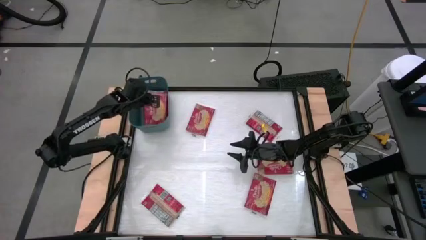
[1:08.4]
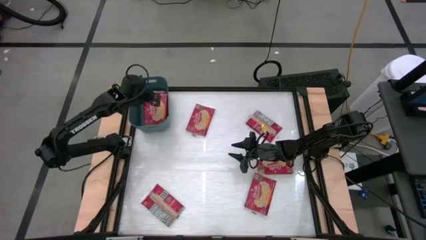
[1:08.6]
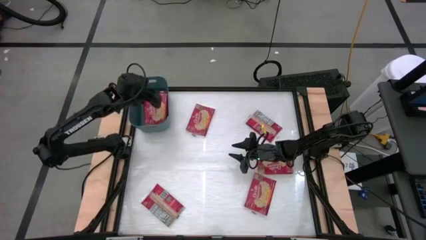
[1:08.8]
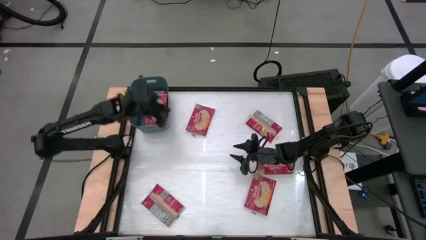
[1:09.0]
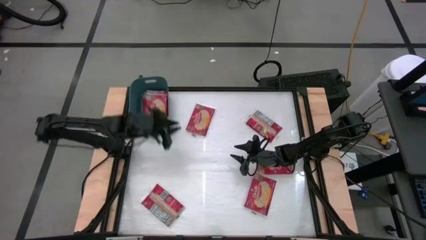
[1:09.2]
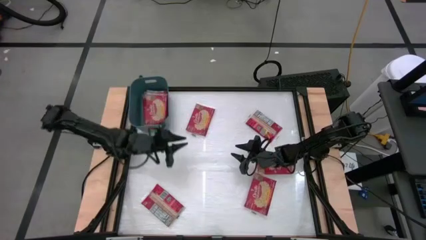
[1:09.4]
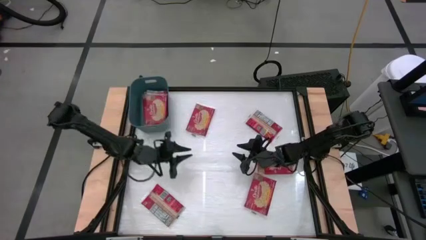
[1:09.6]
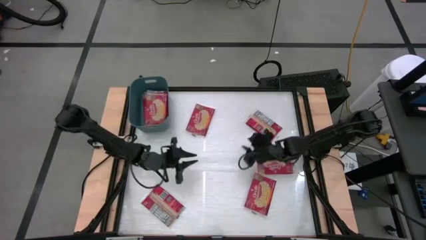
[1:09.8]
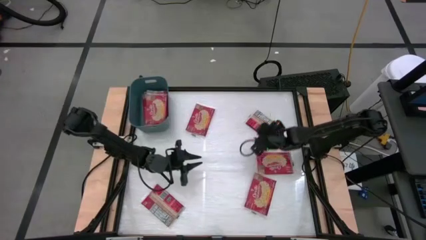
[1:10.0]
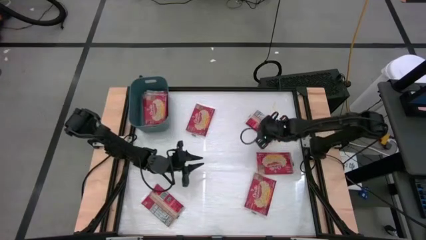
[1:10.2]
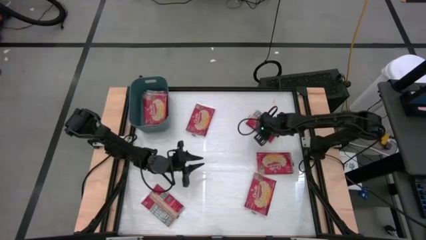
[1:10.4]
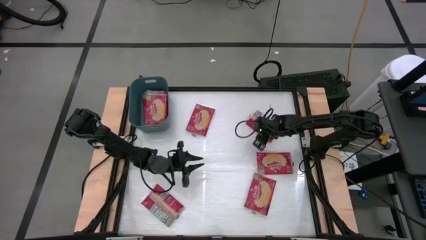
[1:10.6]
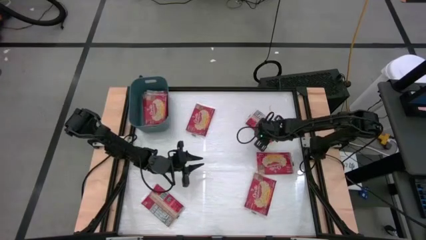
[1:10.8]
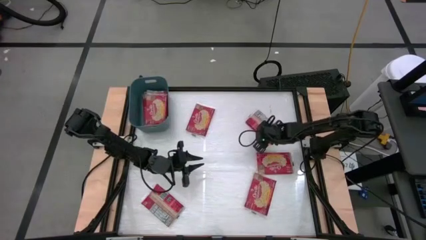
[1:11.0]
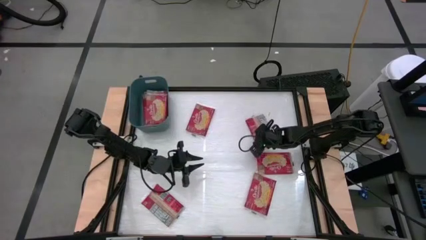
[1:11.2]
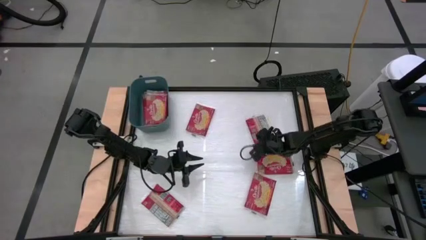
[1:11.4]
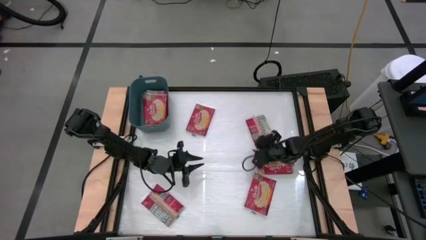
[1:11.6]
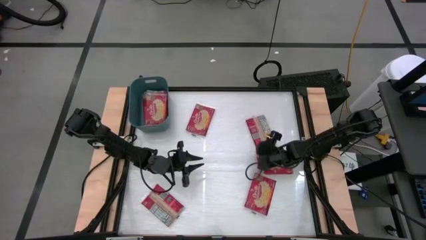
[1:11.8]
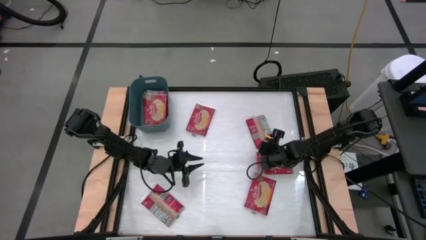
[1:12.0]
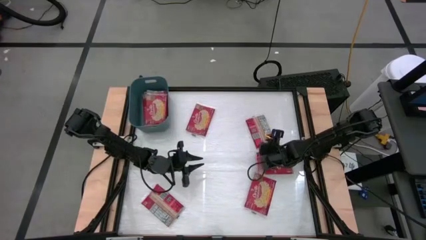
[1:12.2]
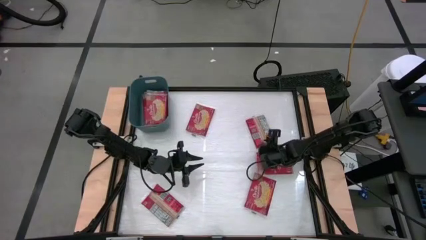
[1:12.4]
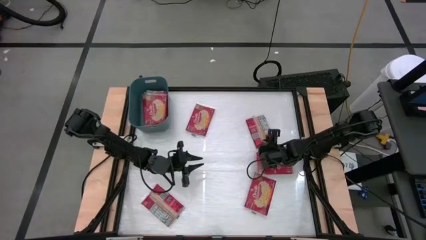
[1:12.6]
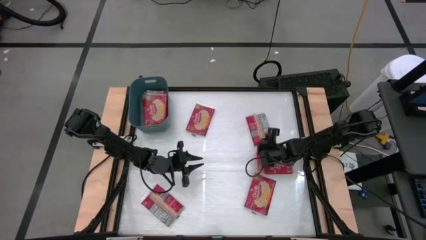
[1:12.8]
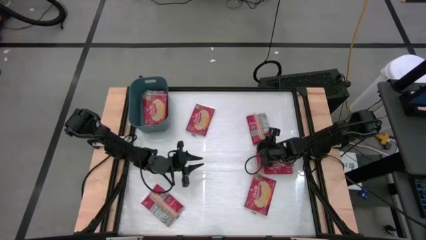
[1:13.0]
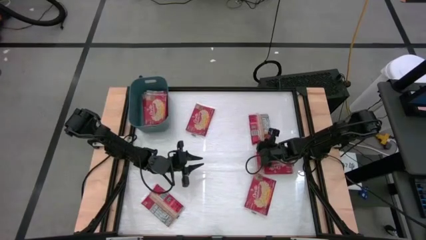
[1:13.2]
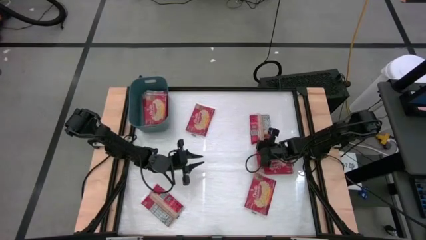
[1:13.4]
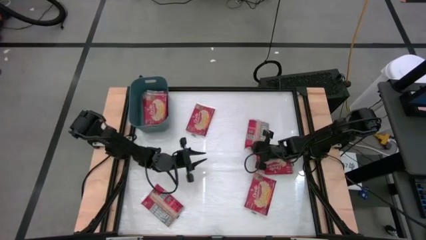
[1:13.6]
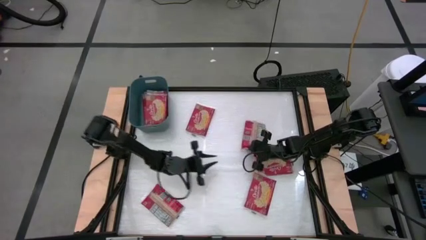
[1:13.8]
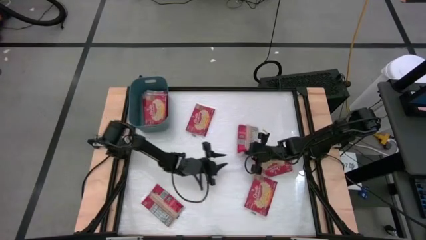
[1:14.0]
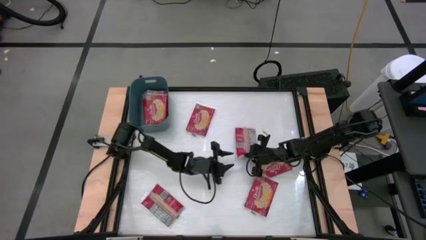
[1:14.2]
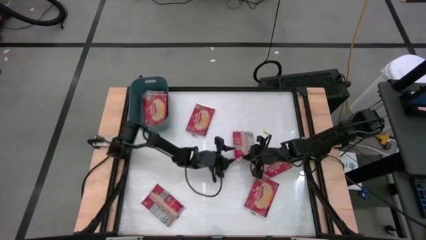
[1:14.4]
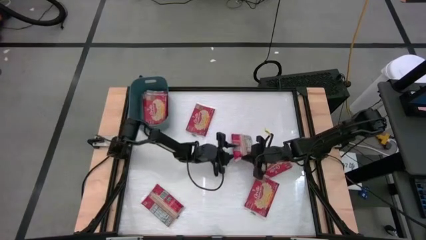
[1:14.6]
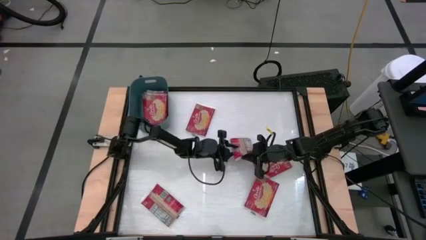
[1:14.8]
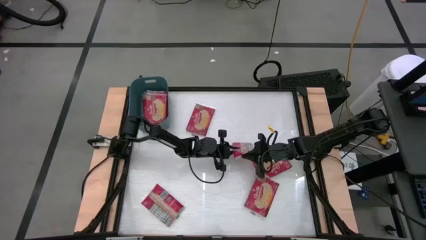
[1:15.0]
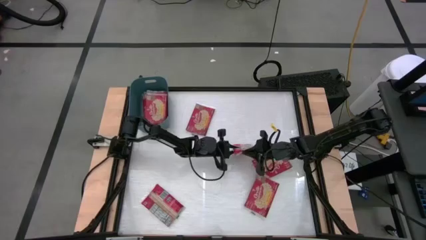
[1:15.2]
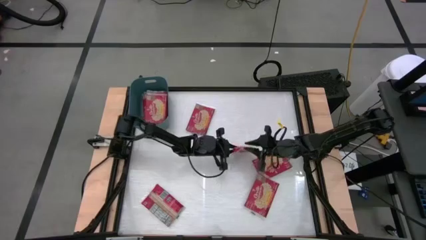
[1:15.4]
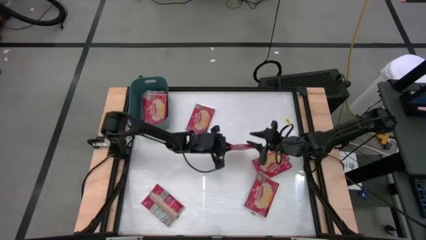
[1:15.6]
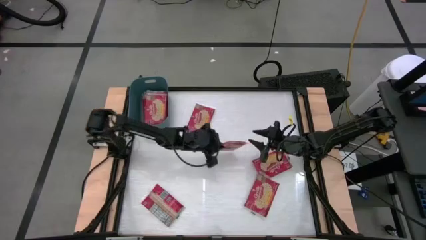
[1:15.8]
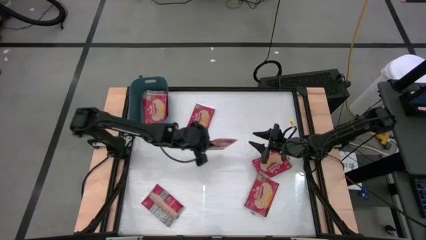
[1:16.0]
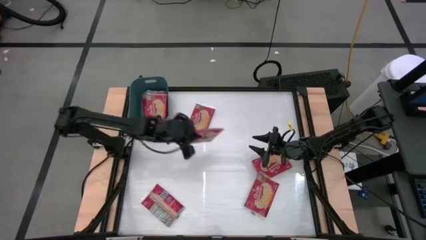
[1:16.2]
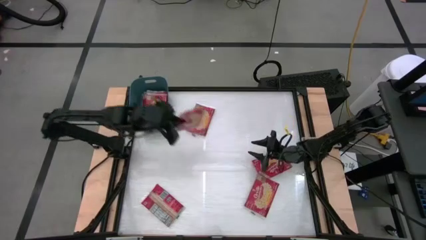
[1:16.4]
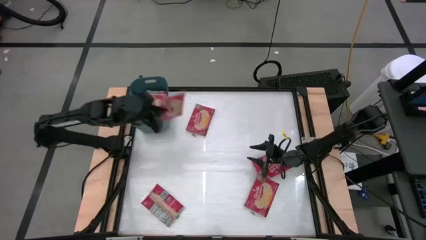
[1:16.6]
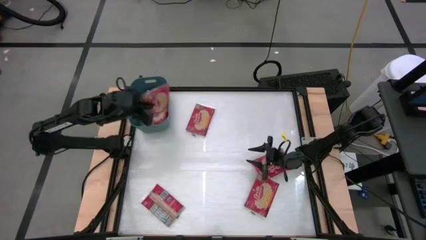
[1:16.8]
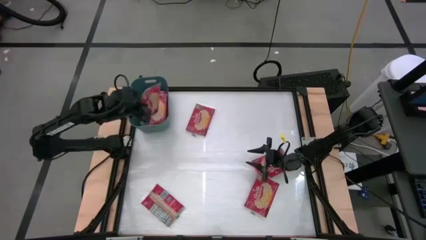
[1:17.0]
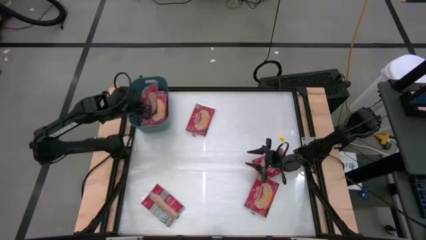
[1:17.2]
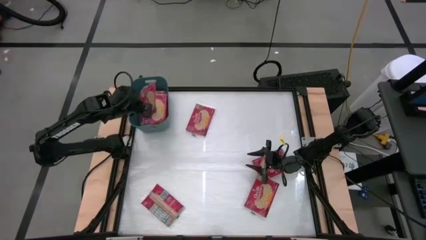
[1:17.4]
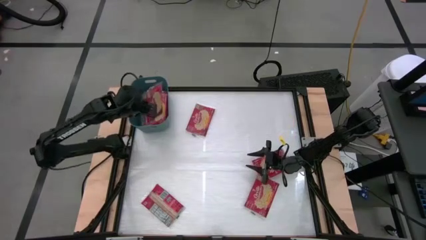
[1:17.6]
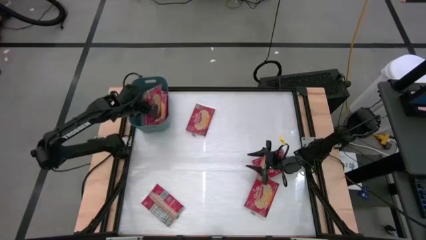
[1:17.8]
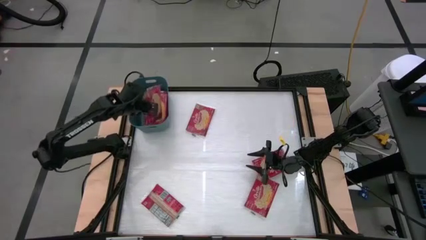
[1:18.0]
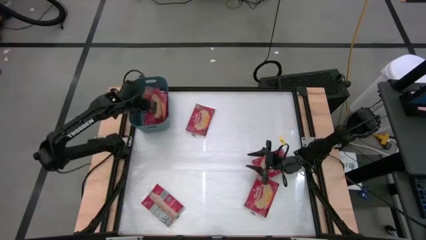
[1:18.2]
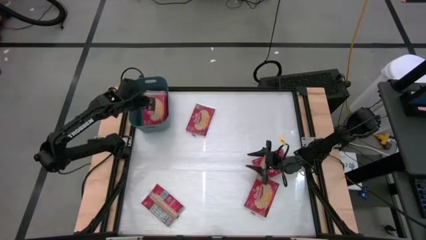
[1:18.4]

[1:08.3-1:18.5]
Task: Sort popcorn bags into baskets
Stack the red popcorn bag on top of the other red popcorn bag into the blue bin

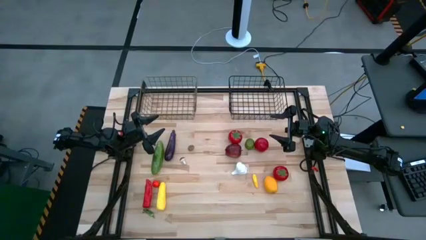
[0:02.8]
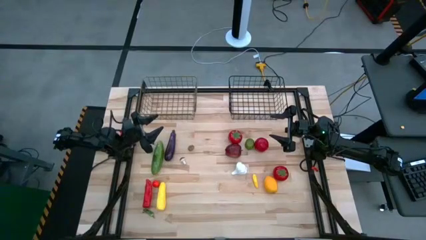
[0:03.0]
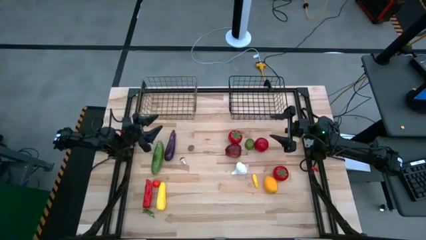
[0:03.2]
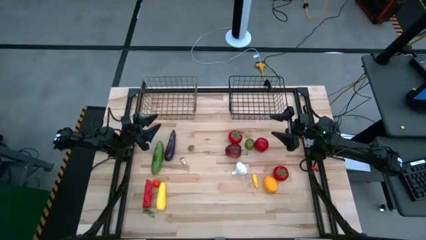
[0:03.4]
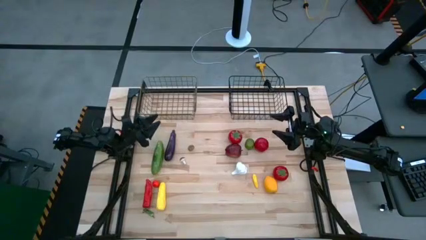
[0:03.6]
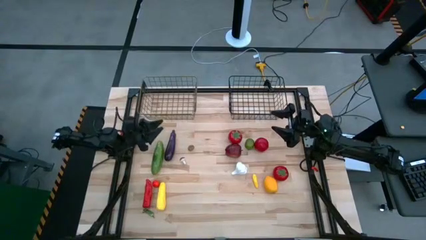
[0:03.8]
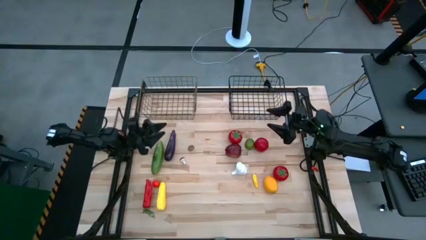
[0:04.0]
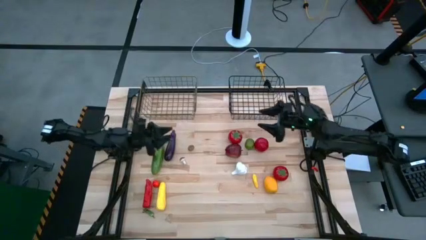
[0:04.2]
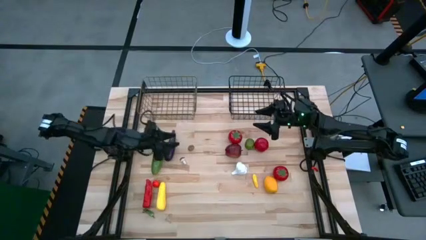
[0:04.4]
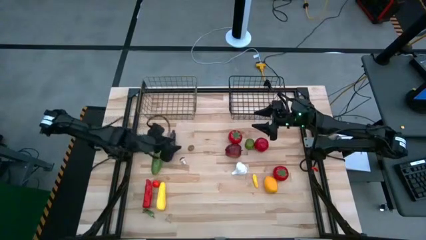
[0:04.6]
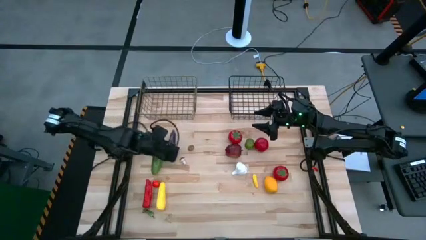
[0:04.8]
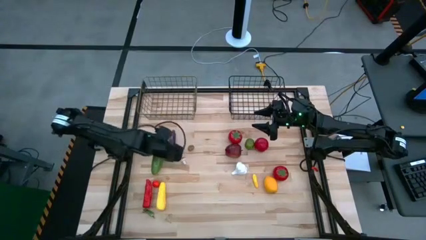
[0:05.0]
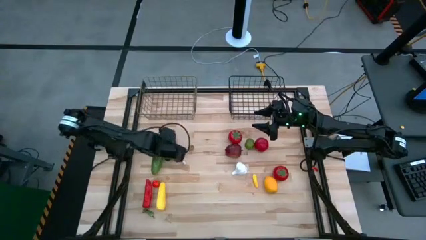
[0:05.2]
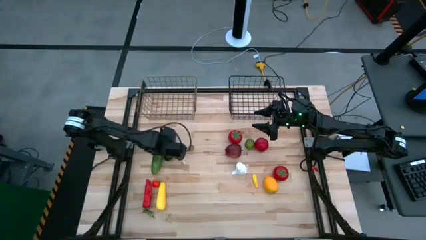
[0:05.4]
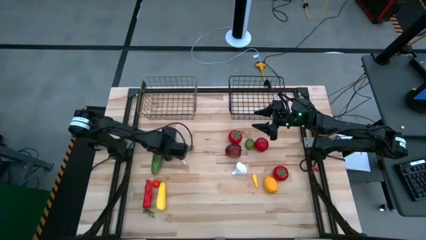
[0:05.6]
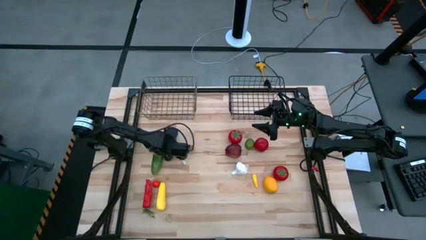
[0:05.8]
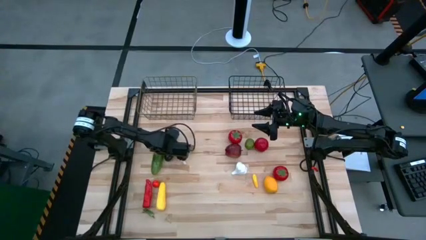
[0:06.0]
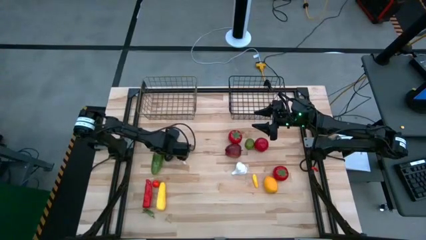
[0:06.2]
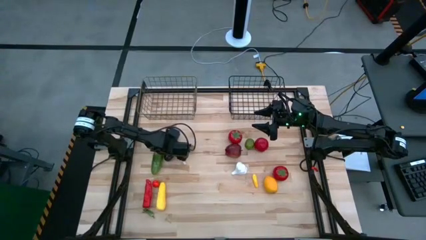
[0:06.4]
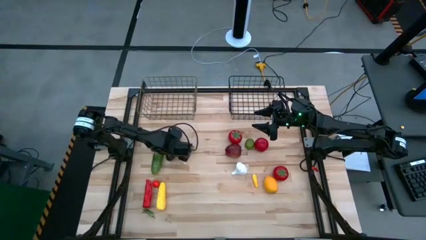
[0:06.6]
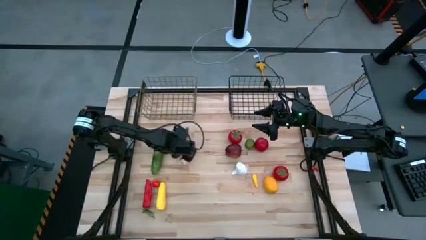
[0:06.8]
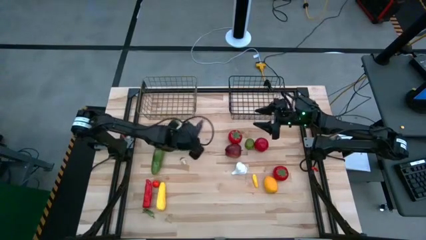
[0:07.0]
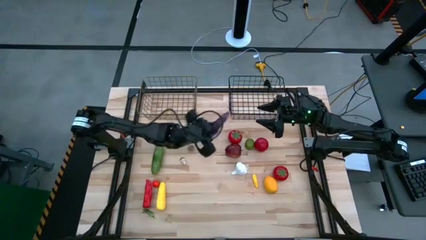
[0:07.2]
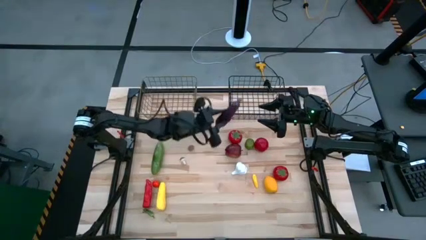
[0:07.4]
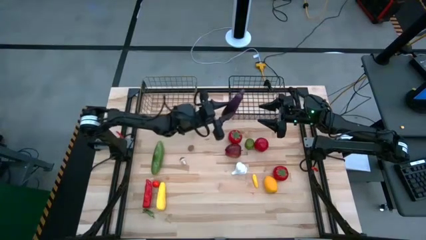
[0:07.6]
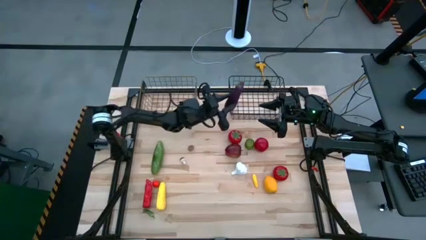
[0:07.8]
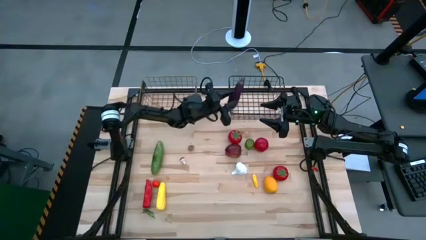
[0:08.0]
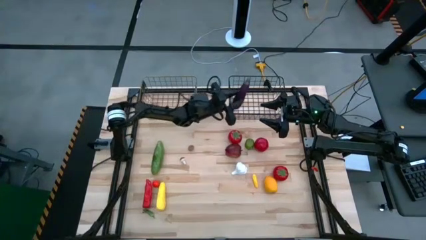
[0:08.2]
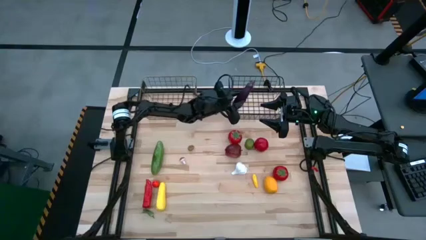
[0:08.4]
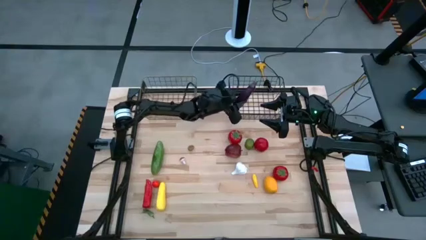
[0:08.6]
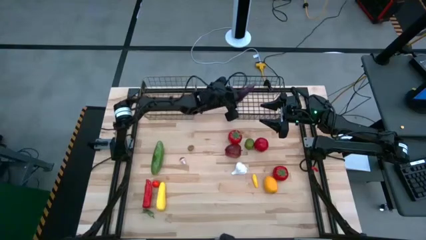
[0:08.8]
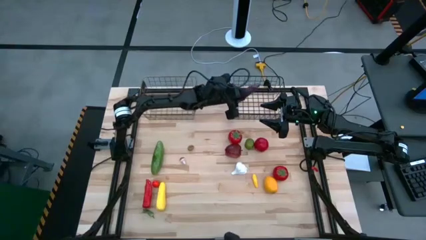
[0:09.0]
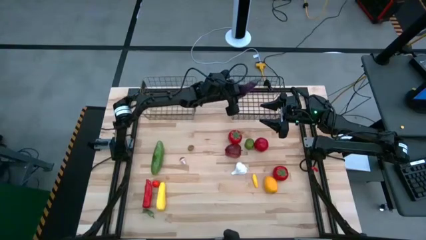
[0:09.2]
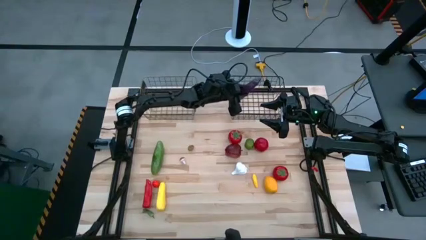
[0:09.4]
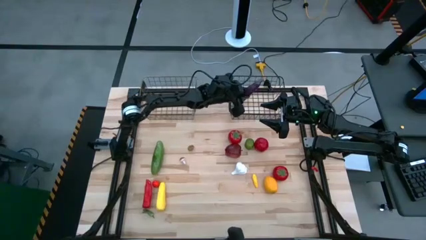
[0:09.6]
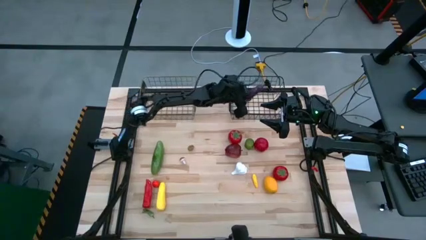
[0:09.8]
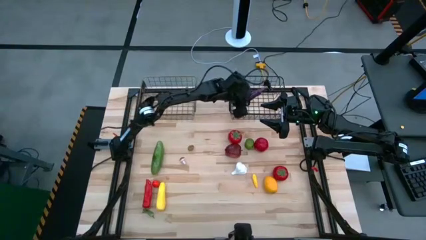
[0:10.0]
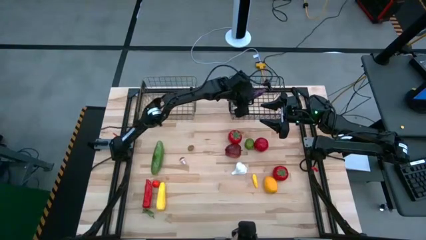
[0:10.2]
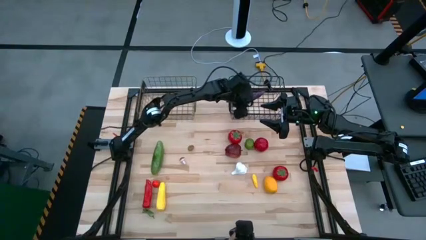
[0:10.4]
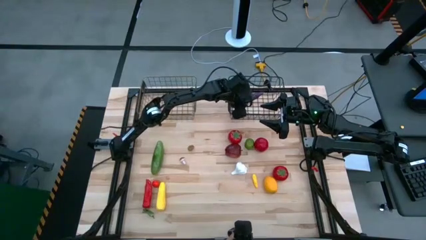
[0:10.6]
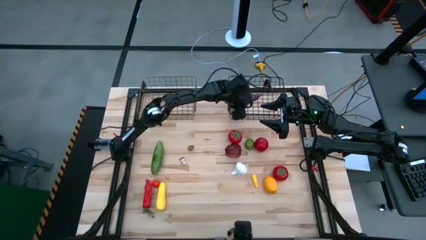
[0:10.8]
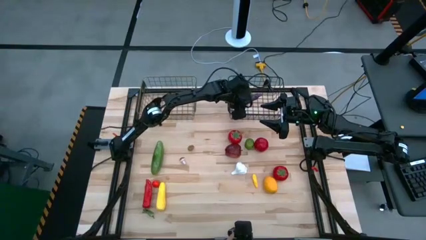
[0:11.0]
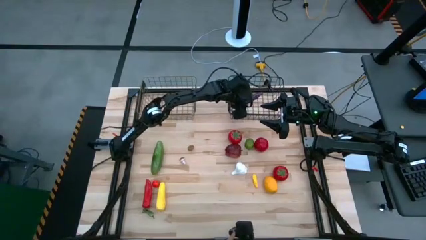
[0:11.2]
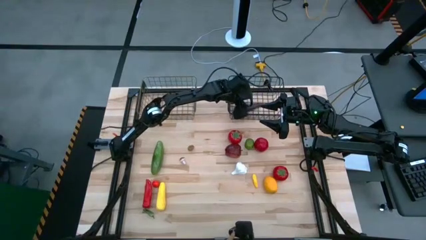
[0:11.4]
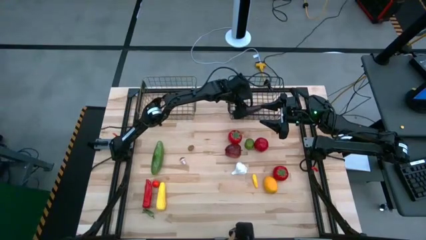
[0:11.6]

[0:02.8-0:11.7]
Task: Sort produce into baskets
Put the eggplant into the right wire basket
